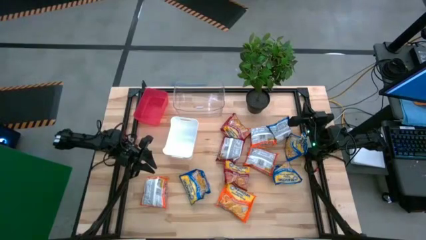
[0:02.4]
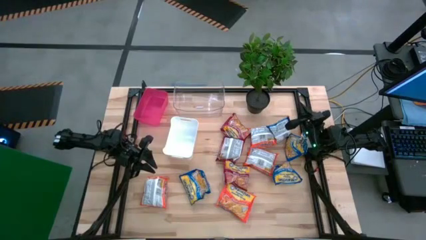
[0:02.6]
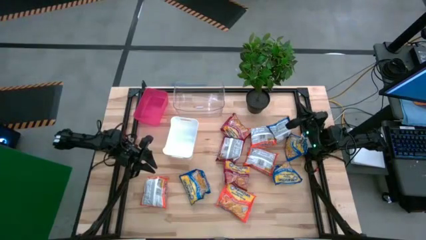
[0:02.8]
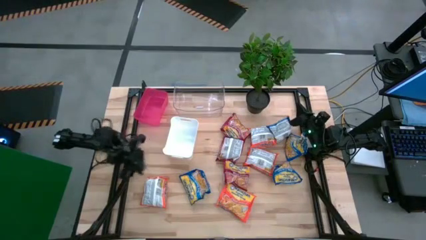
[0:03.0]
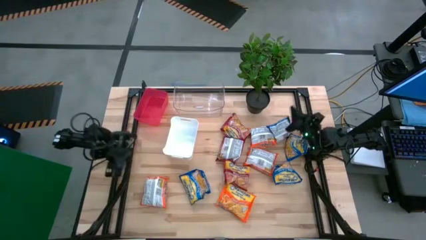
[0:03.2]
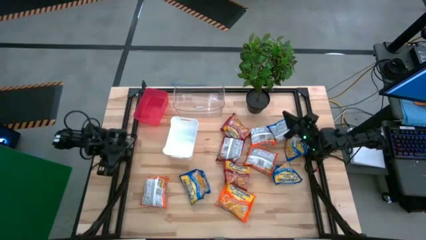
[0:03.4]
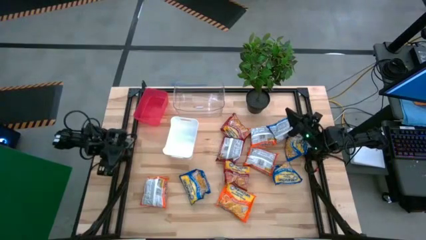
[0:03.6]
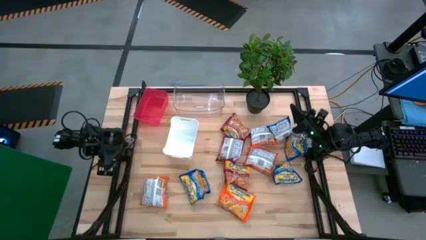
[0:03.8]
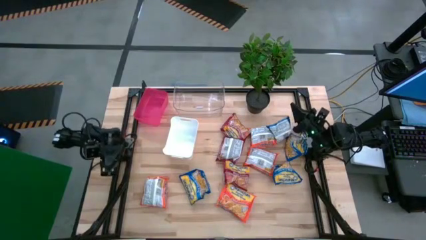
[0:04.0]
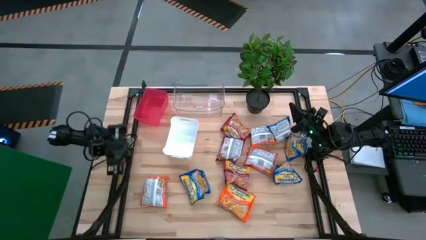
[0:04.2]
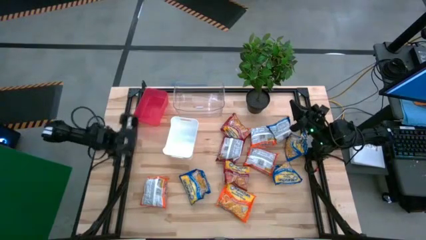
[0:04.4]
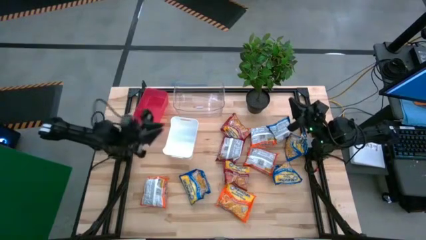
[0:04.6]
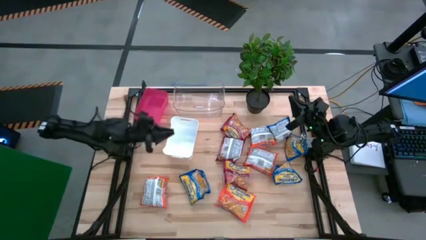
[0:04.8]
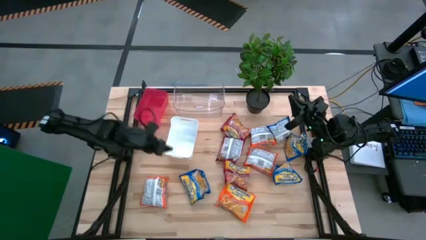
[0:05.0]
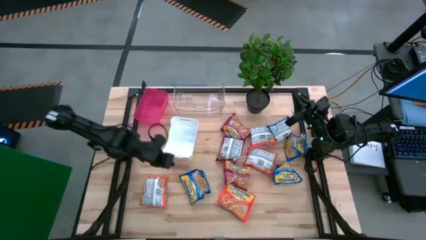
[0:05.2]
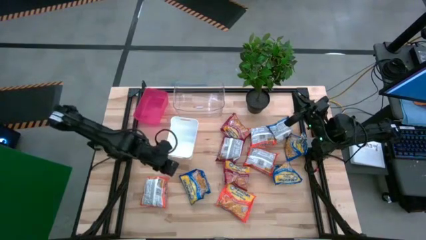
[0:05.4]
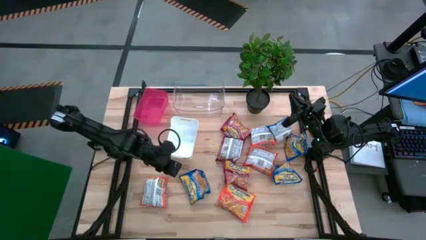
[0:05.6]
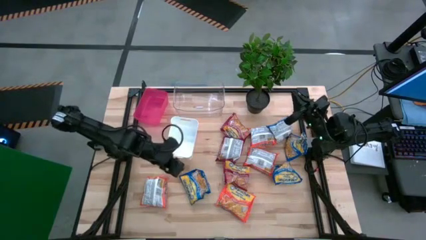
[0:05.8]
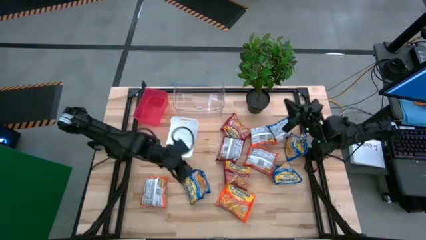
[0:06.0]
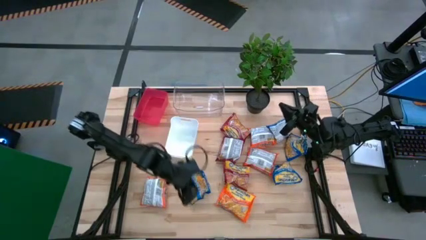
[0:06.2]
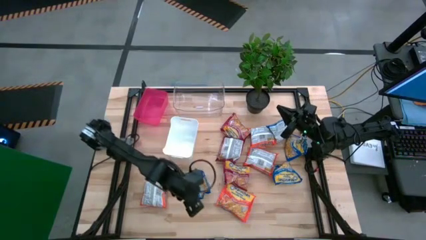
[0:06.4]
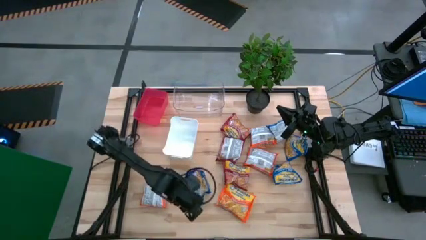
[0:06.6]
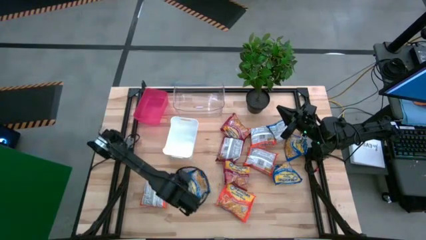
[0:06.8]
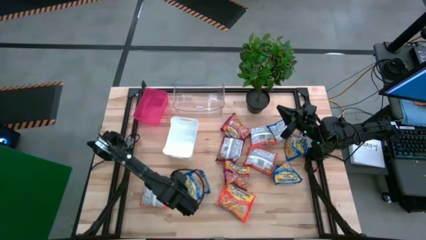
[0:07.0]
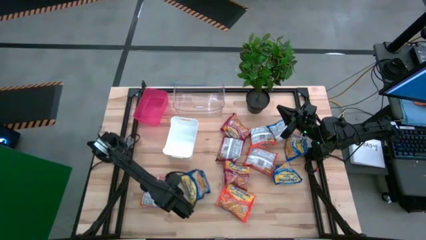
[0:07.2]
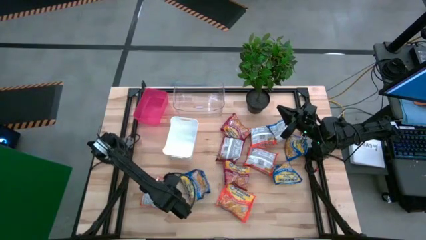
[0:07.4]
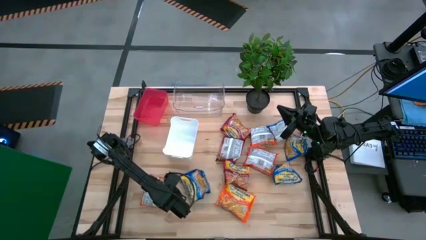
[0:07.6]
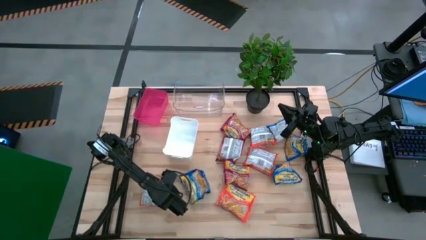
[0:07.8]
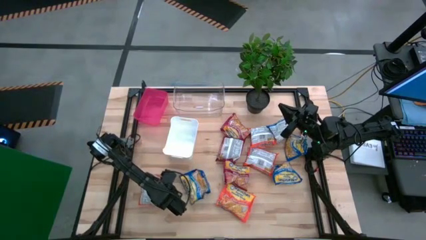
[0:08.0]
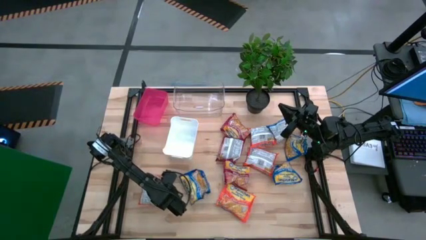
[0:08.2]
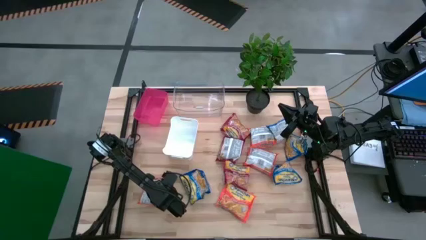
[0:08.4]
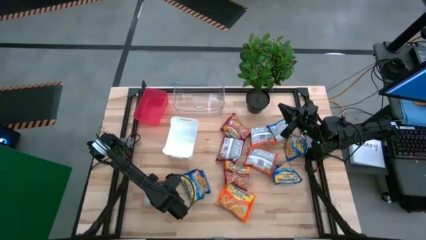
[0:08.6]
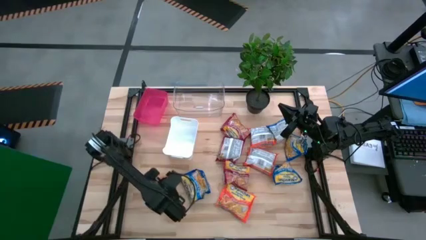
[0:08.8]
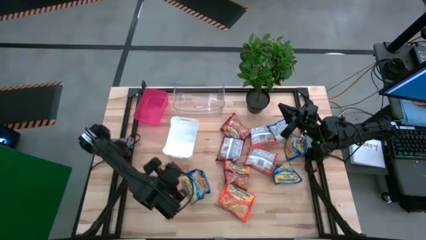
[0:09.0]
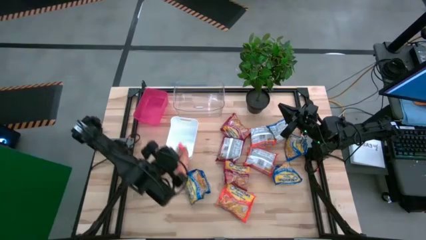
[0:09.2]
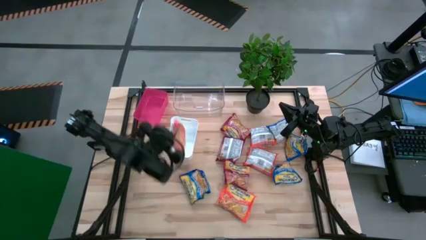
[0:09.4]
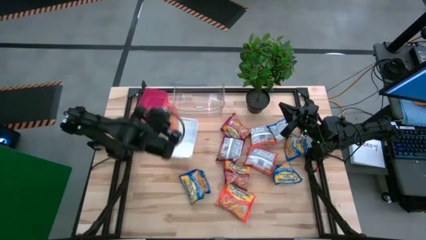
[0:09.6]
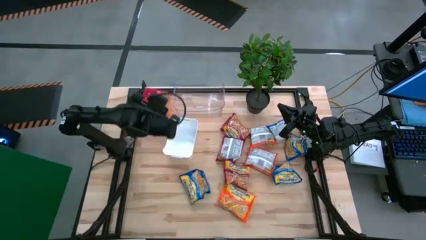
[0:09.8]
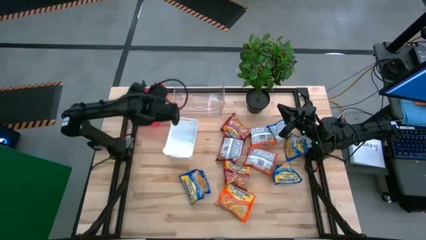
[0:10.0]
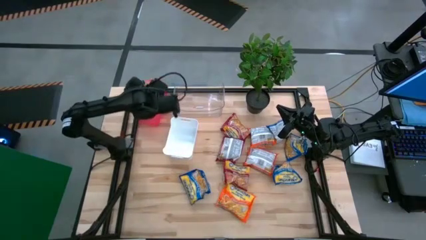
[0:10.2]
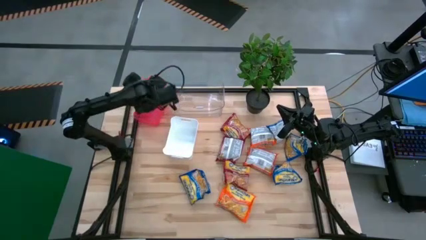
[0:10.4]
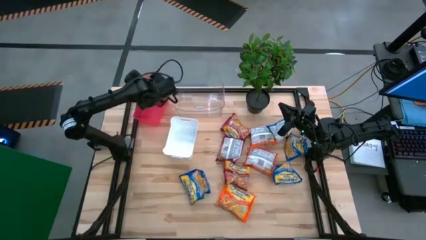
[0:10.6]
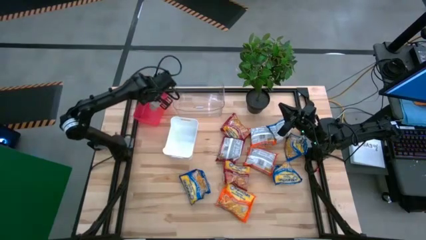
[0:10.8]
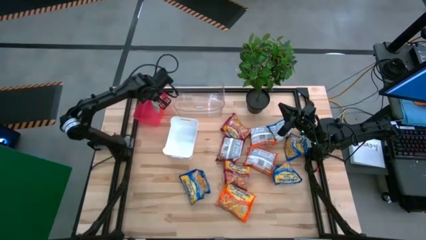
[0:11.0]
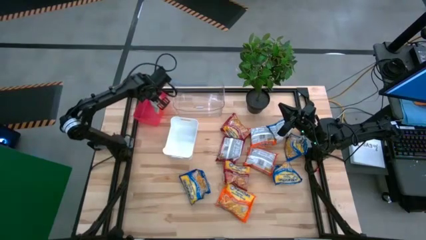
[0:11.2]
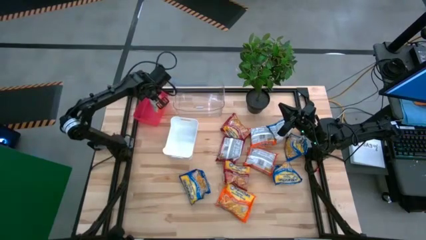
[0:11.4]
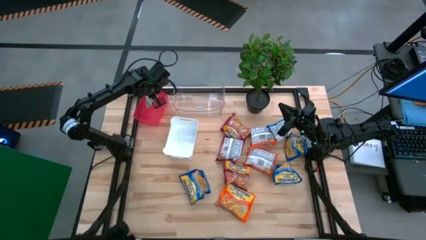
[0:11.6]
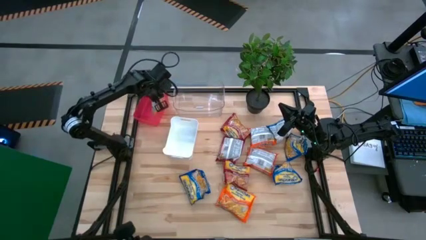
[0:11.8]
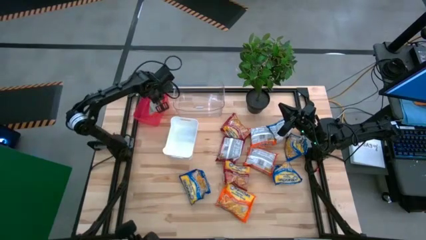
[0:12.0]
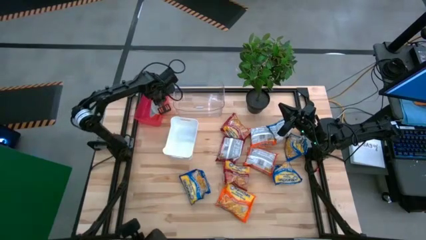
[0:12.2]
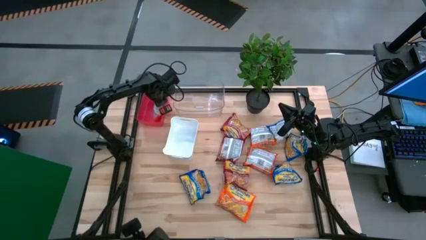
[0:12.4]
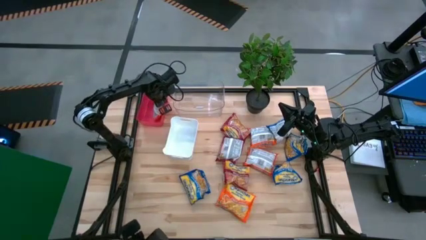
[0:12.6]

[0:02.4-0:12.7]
Task: Sort Maruchan noodles
Put the orange noodle pack into the red bin

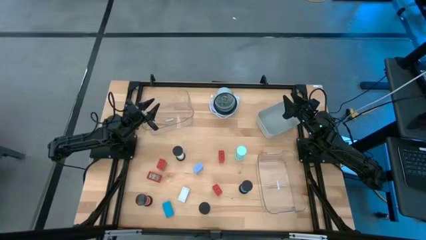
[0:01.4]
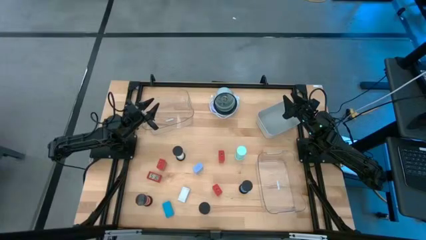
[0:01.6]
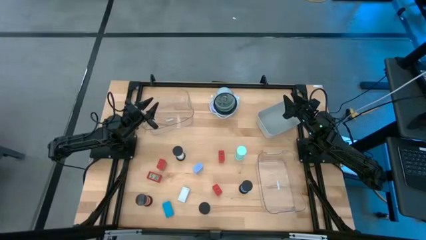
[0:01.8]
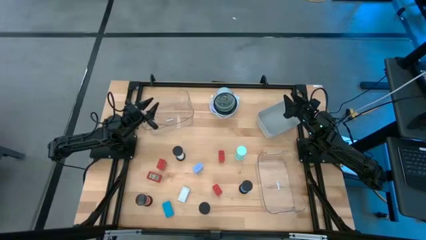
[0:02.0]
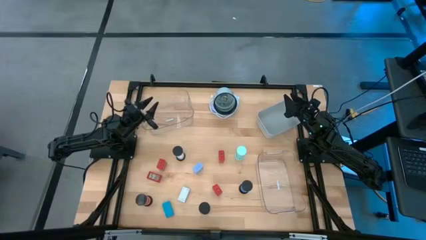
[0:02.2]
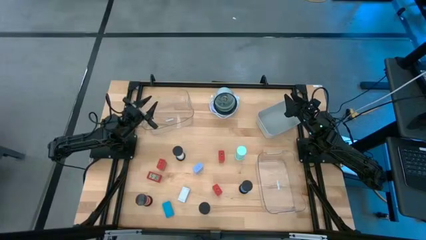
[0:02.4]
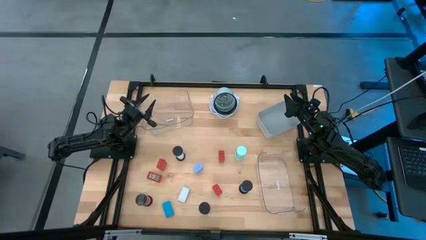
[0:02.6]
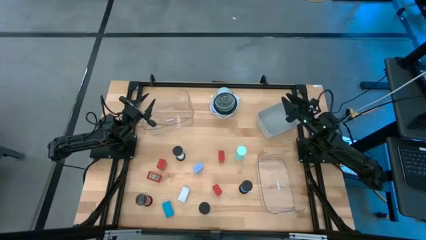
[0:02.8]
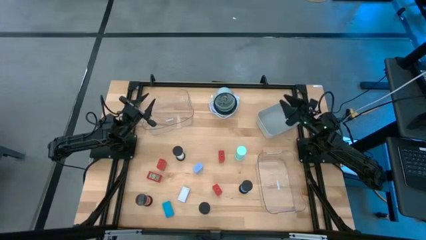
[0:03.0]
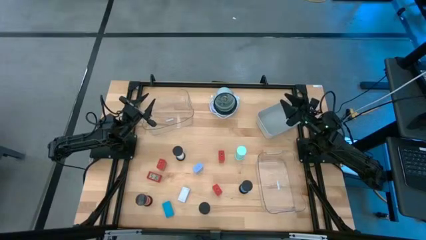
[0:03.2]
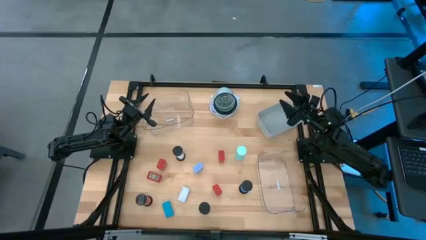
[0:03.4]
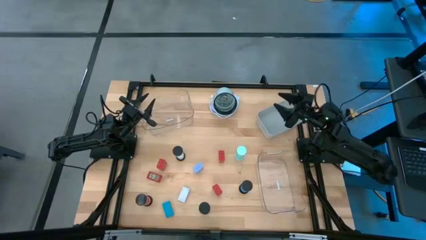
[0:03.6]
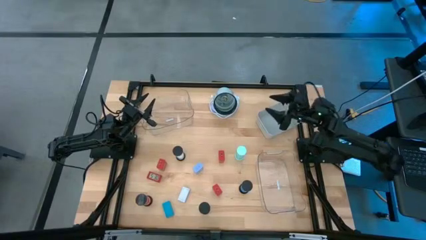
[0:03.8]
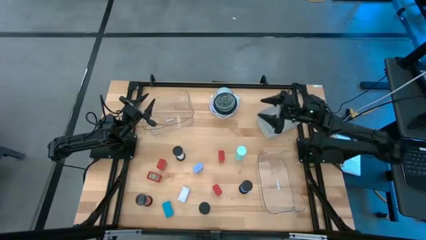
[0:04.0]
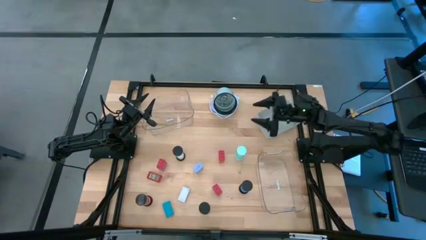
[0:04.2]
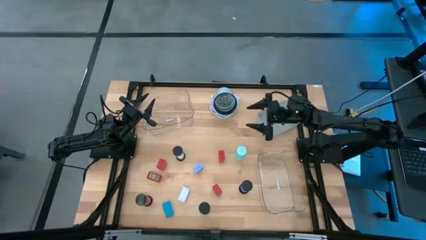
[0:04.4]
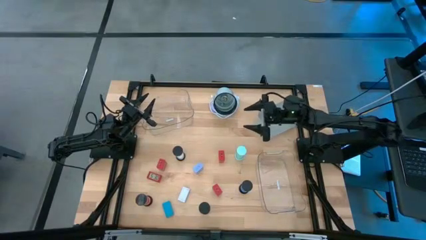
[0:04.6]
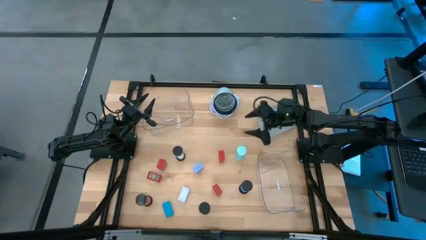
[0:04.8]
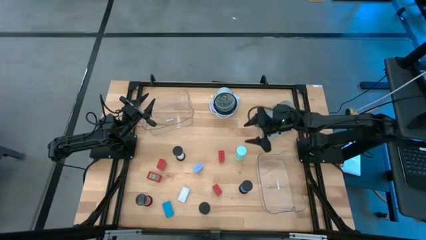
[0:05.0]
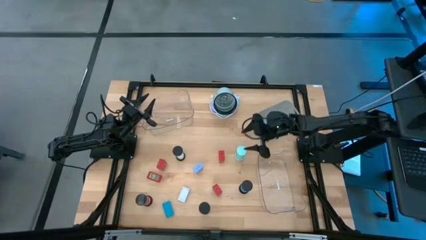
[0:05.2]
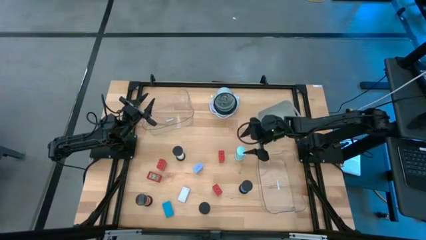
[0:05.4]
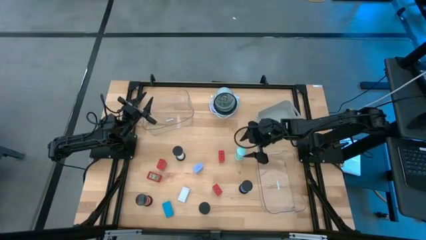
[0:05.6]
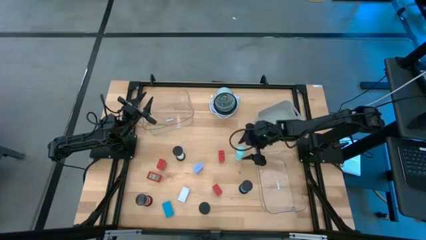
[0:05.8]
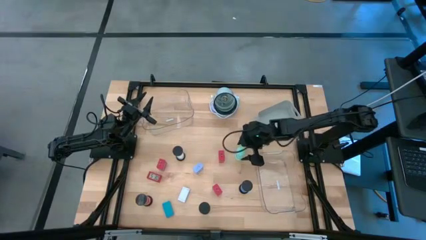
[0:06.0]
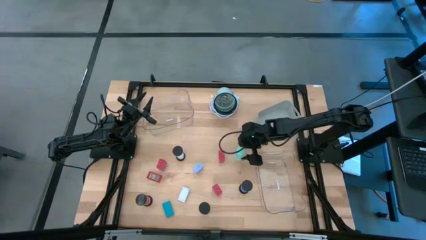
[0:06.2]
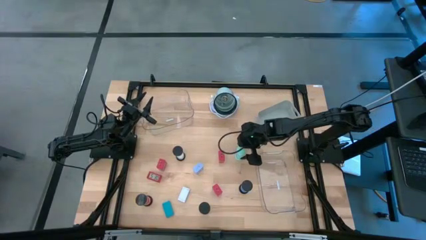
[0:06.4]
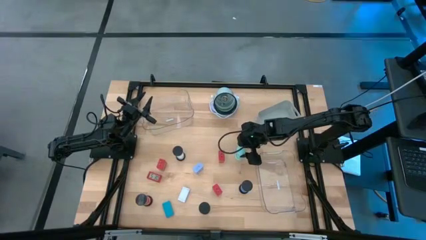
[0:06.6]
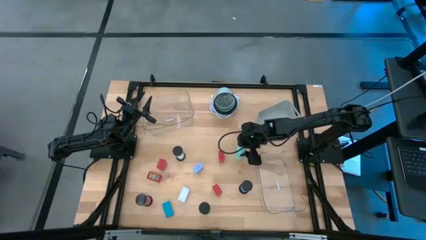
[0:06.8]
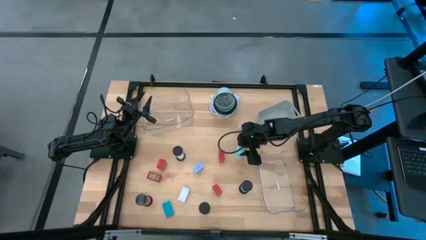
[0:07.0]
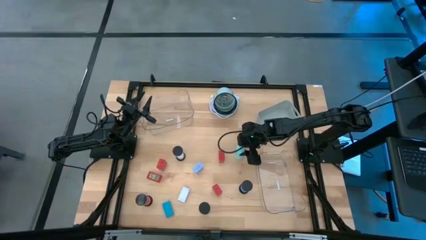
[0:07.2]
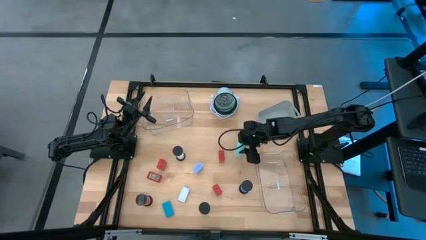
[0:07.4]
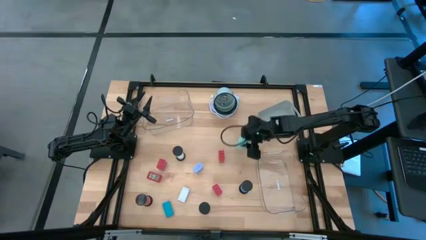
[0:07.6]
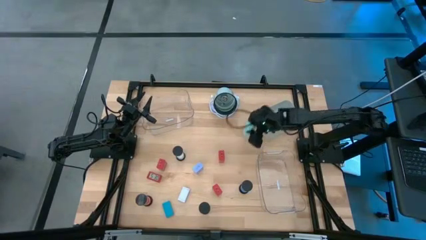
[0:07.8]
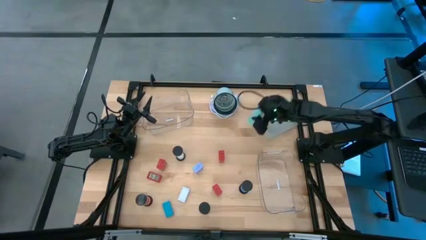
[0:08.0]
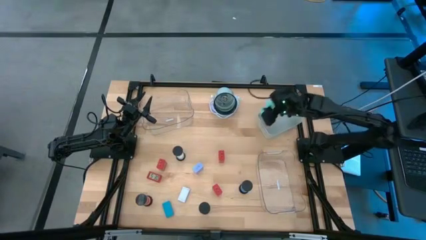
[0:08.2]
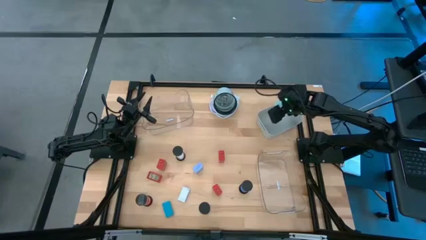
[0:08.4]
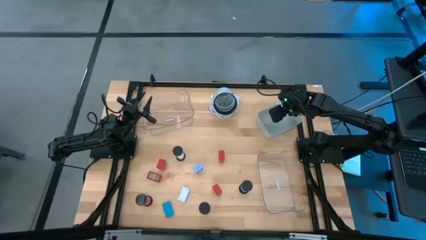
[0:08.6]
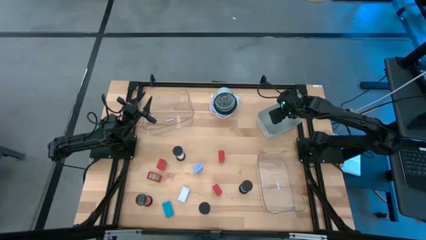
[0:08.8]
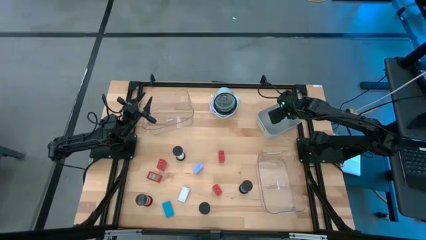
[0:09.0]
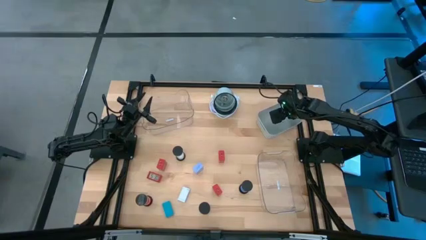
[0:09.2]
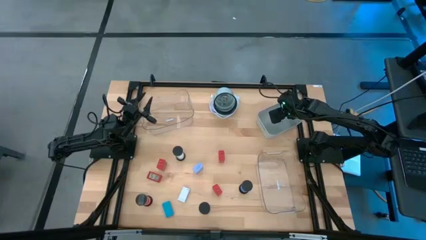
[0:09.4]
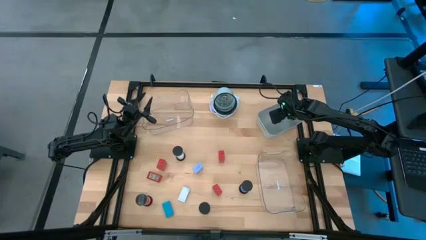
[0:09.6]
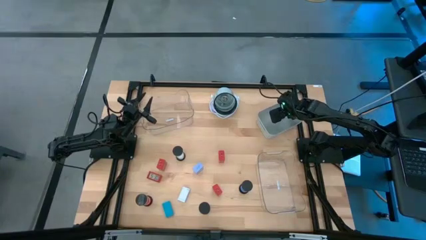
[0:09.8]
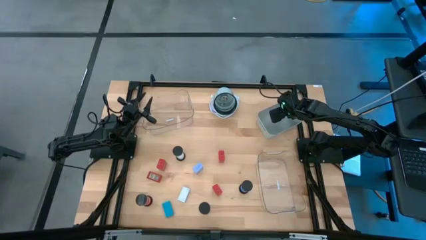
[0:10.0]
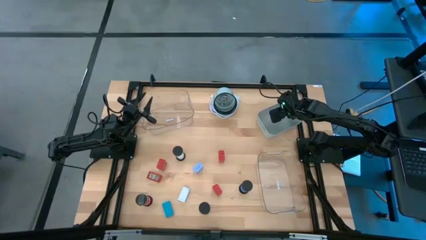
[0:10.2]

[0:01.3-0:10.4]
Task: Pick & Place Office items
Put the light blue hourglass into the gray bin
